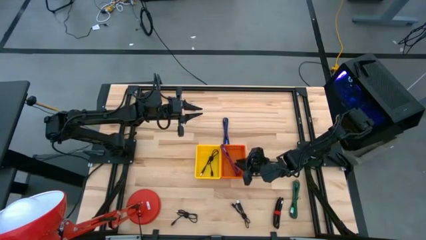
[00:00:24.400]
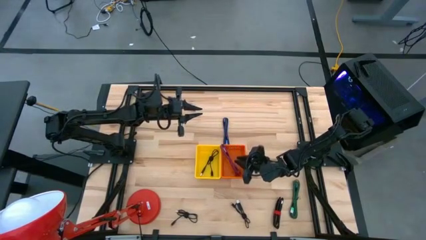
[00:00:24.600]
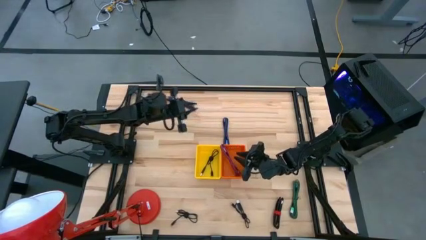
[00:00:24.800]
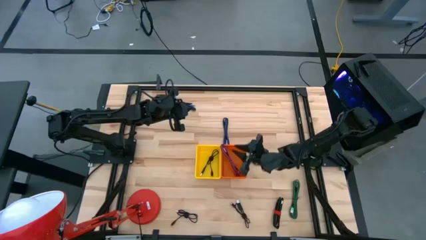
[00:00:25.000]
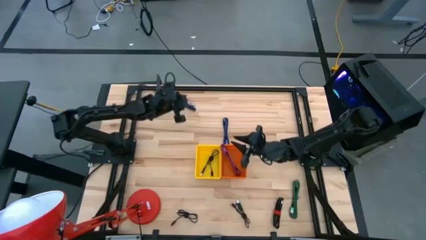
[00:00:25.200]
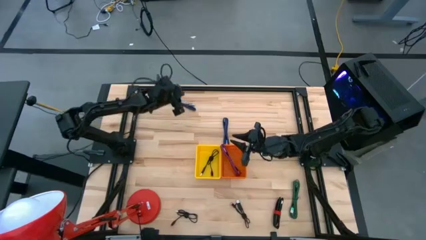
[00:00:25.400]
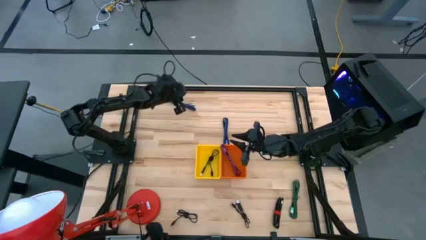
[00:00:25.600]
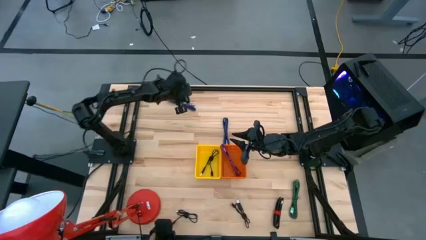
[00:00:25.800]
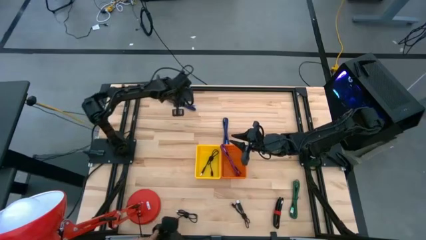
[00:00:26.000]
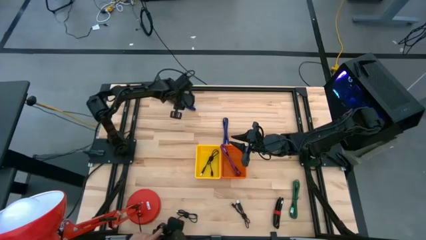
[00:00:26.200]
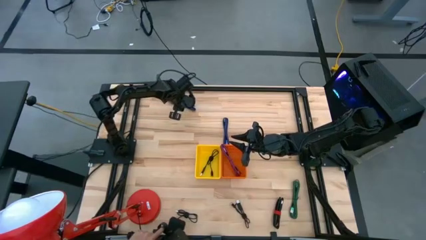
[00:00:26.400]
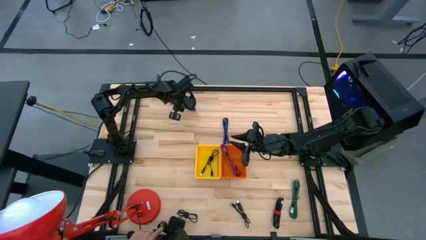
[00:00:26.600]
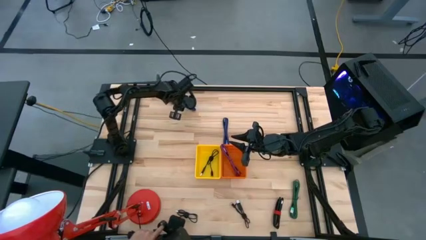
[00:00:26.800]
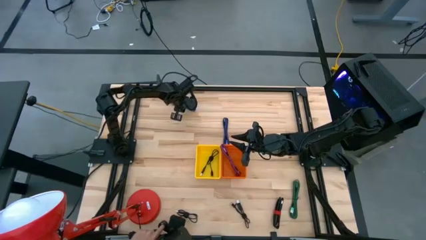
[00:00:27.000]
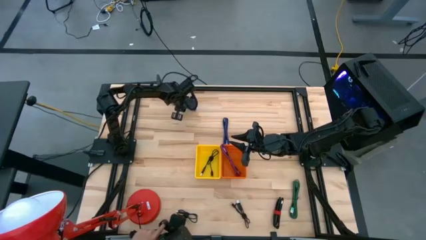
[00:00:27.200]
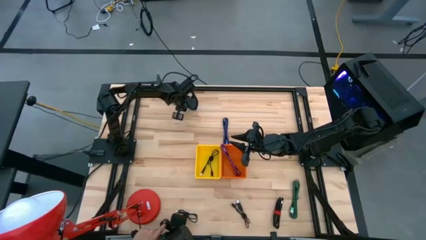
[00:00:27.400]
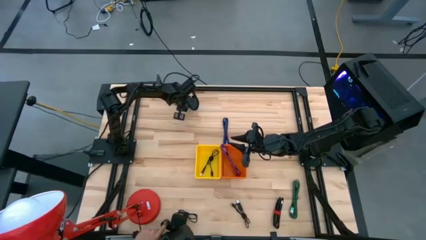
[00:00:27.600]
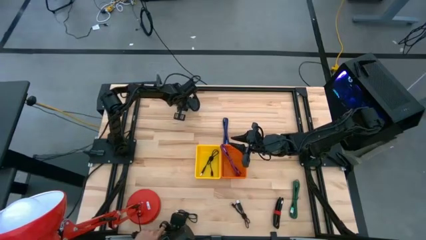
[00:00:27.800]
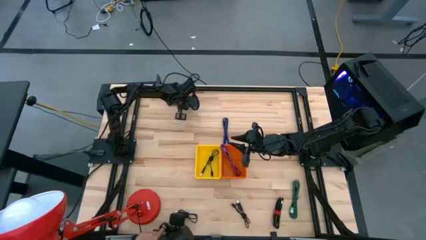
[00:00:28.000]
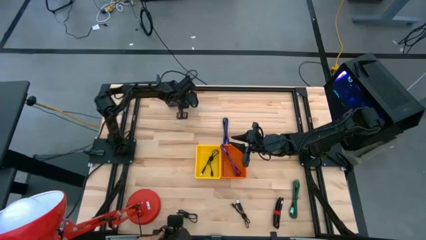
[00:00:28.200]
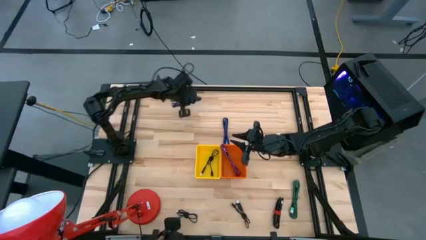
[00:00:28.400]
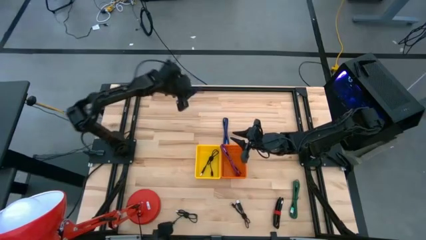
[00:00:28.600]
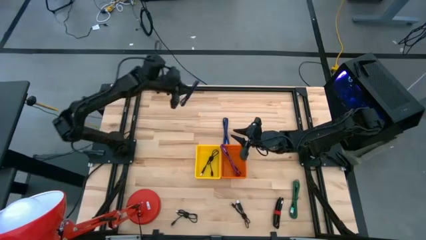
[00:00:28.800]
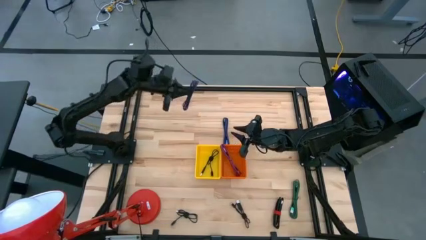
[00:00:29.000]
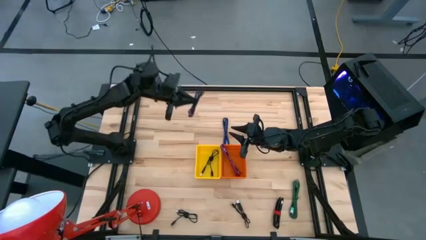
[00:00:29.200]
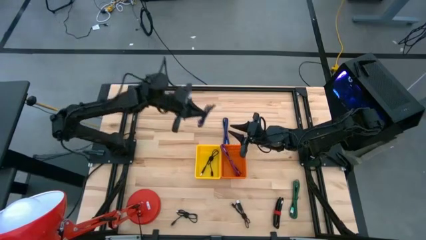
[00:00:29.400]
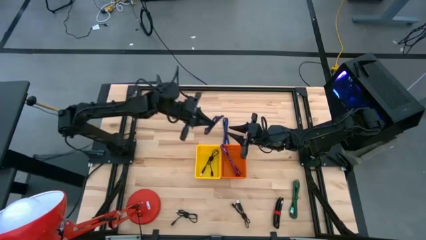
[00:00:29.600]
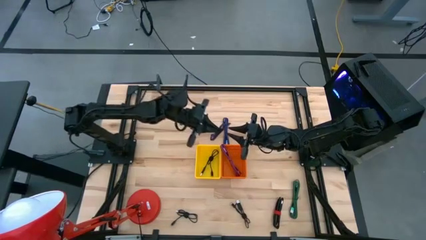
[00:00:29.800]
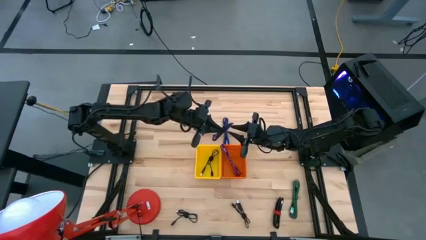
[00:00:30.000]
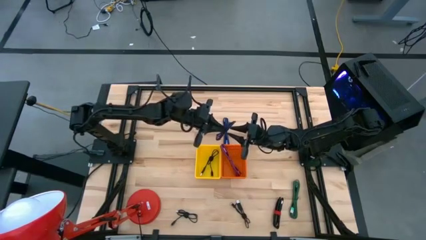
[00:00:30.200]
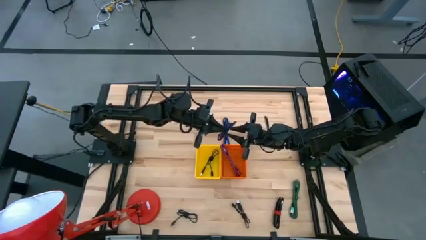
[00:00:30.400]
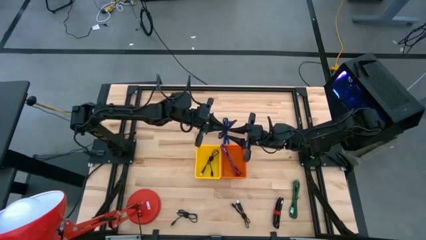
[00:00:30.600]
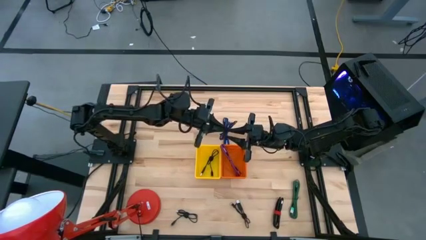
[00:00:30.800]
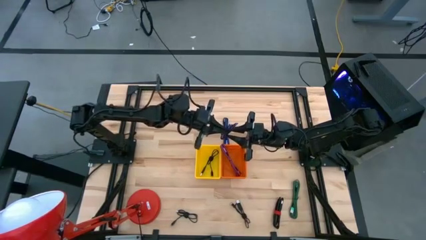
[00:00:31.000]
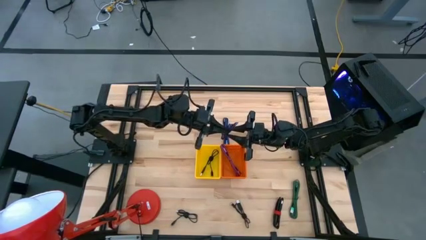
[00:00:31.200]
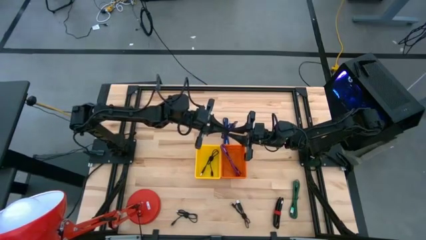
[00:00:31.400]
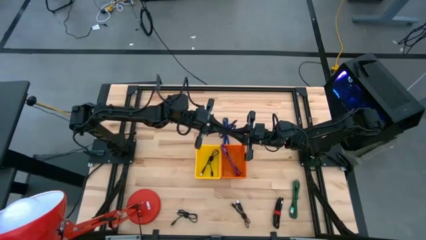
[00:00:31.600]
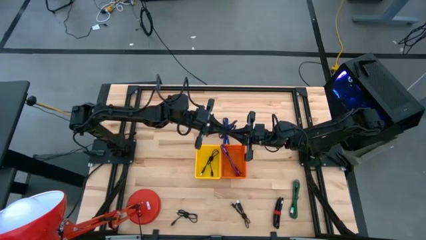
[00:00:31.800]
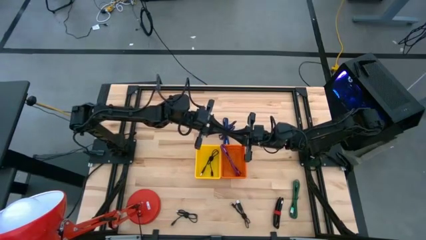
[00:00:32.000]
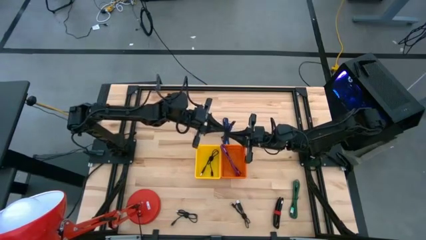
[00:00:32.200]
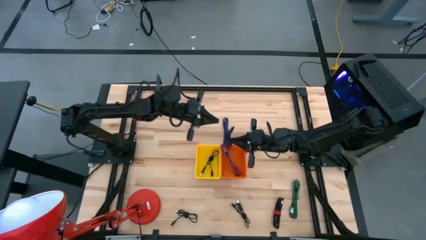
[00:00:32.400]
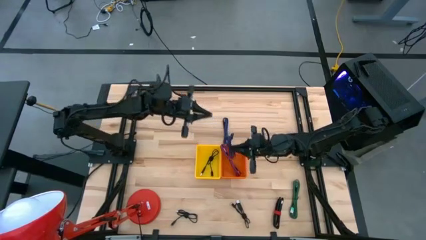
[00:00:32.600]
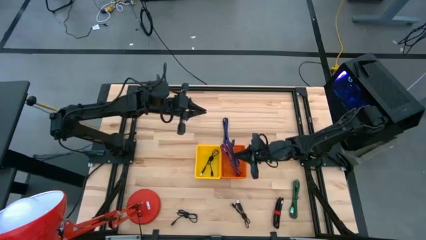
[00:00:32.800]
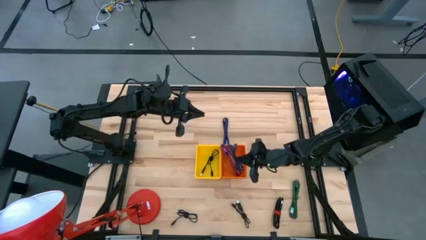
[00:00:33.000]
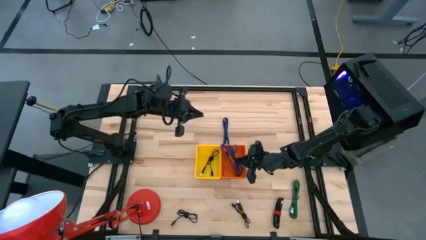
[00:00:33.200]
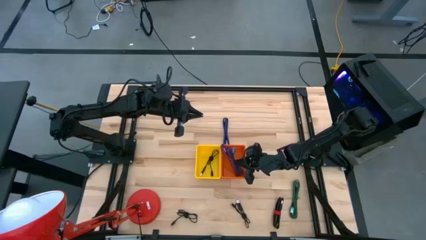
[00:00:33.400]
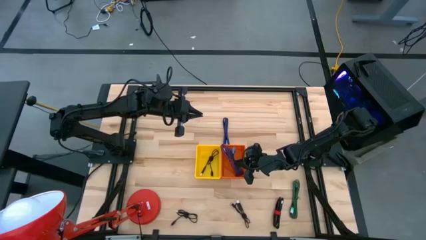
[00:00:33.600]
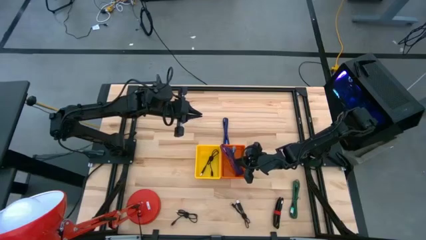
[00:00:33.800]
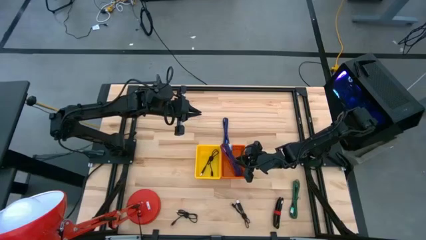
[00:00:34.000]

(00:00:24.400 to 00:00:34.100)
Task: Pick & Place USB Port
Put the top blue patterned charger cable into the orange bin

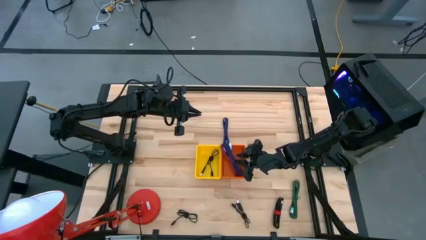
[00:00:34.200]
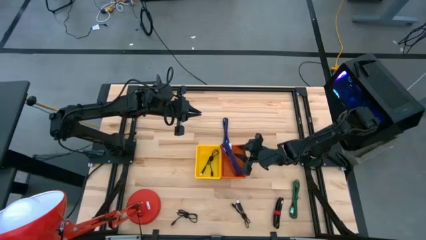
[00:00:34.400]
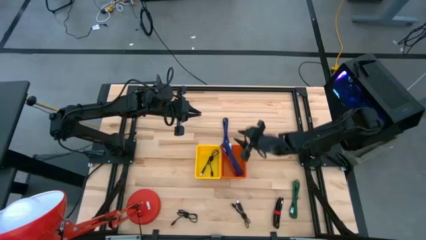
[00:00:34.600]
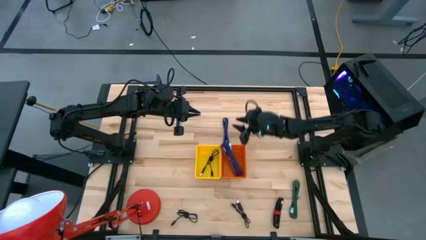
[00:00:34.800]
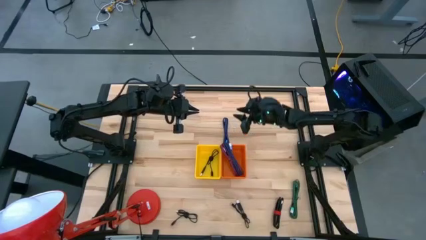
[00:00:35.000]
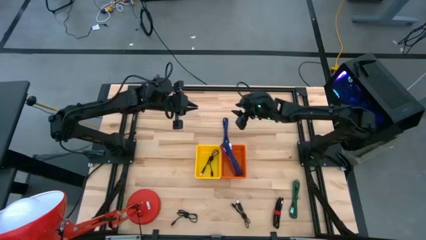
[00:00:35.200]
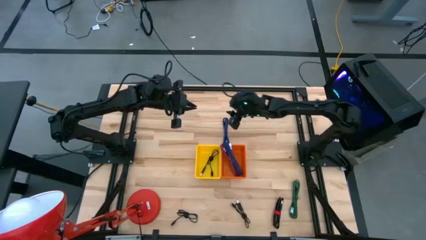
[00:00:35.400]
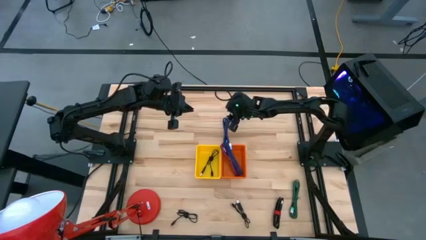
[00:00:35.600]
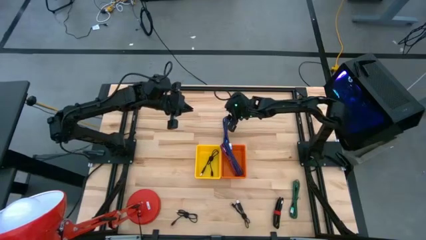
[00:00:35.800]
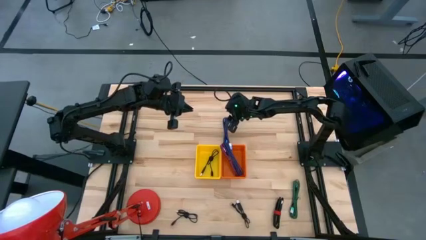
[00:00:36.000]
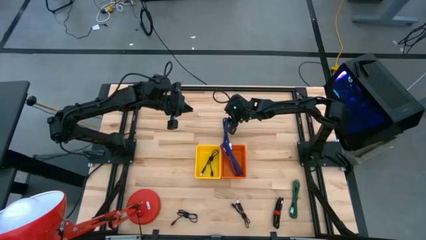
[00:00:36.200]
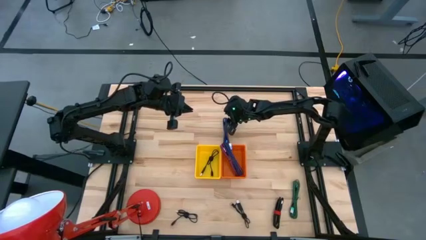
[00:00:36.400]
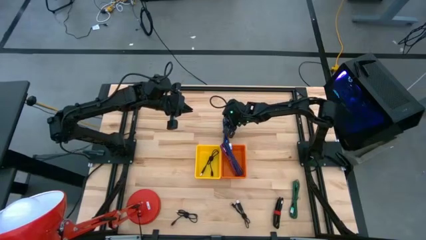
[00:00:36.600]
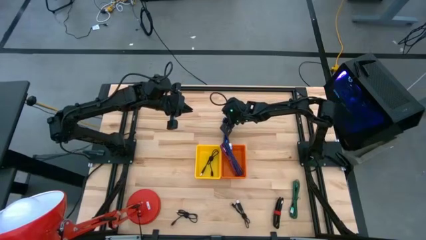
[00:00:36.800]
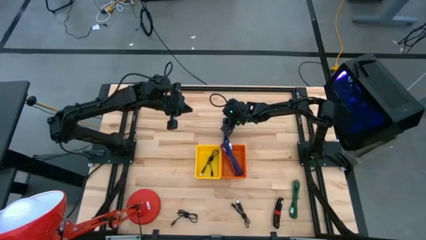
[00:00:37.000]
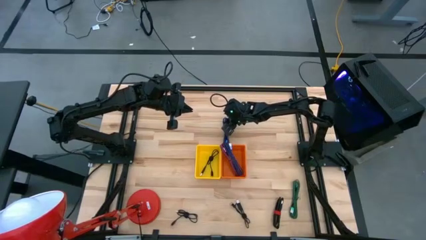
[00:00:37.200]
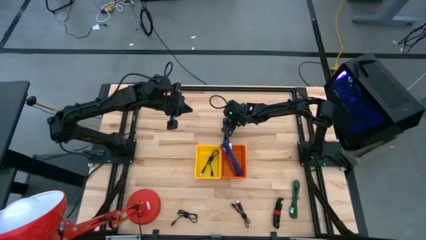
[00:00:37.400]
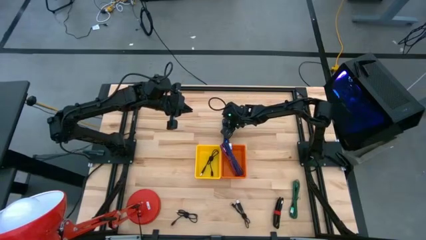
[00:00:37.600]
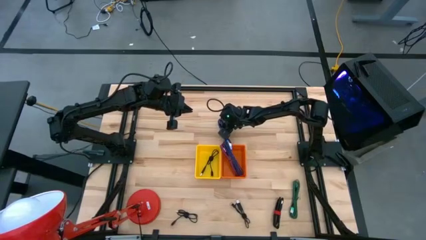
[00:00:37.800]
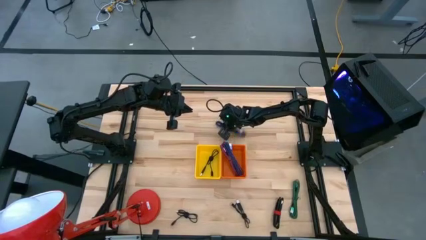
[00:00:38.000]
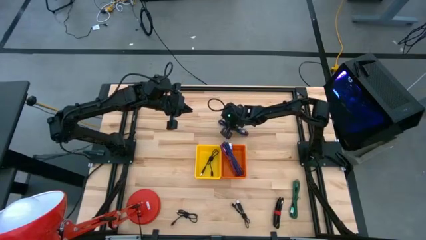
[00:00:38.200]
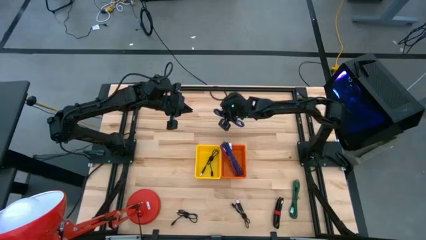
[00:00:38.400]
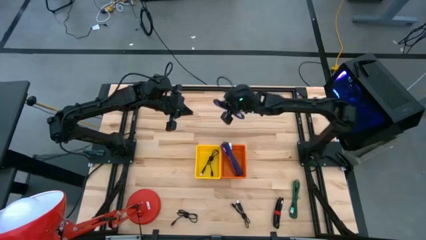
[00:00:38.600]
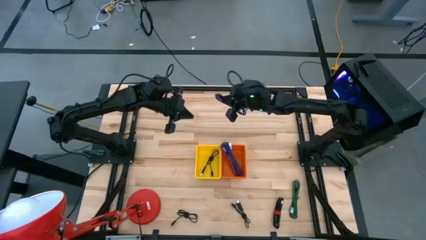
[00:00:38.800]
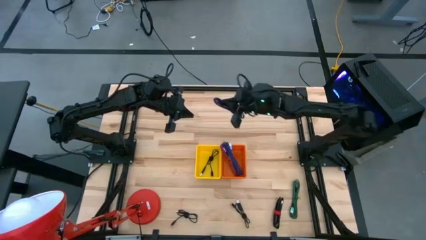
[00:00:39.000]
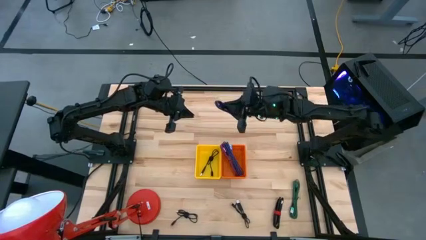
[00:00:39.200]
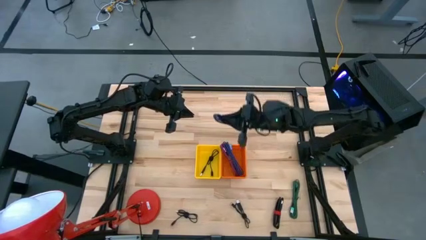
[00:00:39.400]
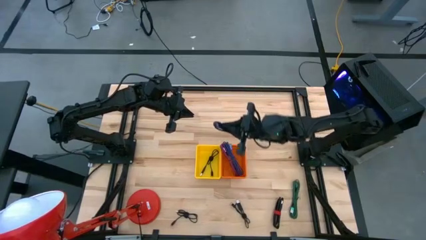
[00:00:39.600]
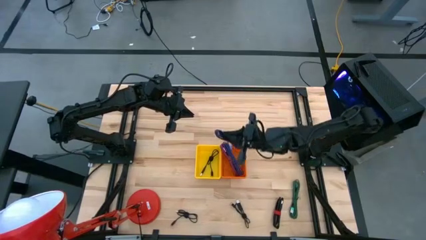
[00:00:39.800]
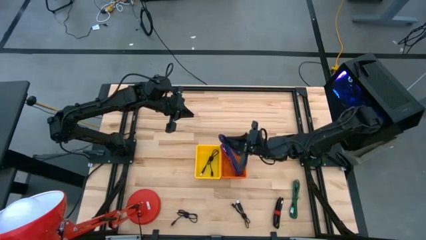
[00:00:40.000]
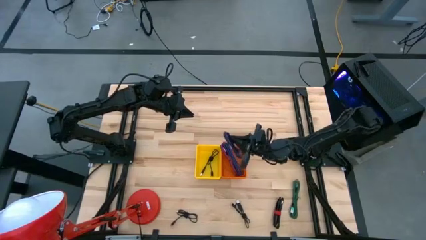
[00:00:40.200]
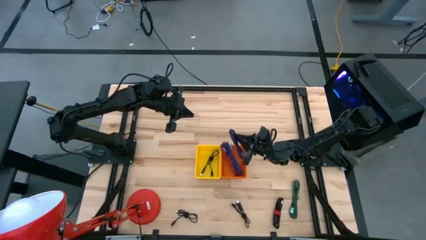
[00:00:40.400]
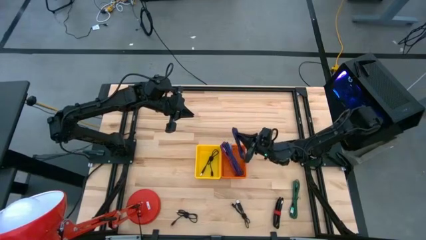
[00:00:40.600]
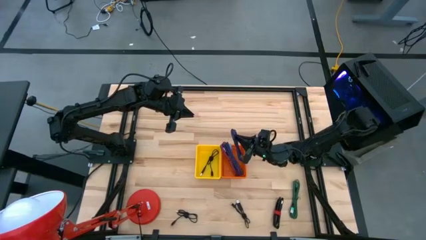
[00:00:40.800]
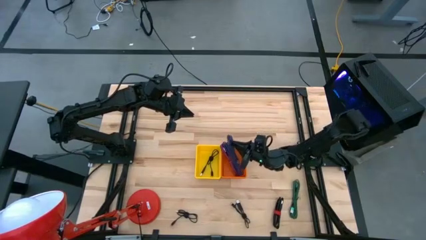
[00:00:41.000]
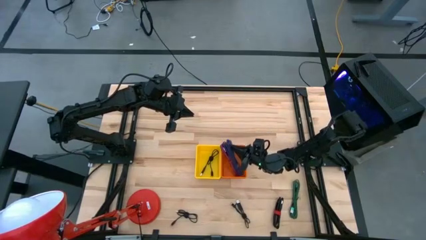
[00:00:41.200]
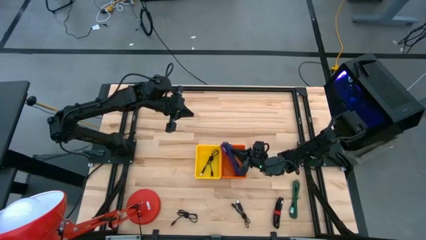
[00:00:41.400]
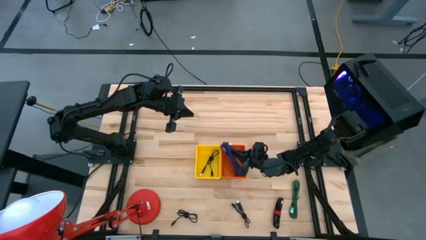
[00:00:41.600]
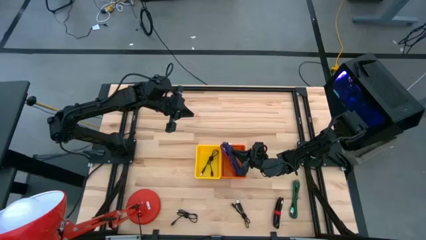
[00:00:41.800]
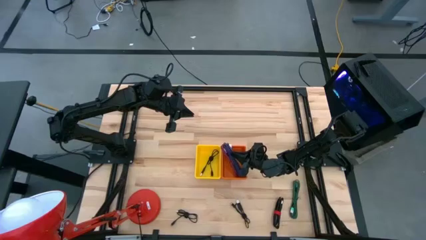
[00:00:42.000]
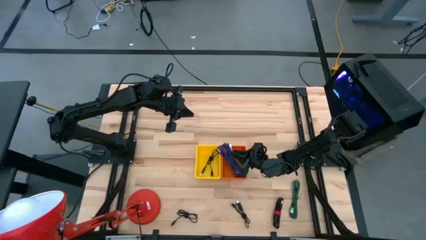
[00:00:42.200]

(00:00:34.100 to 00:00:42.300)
Put the blue patterned charger cable into the orange bin
